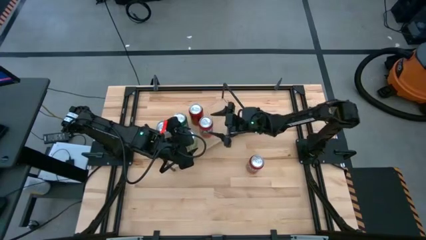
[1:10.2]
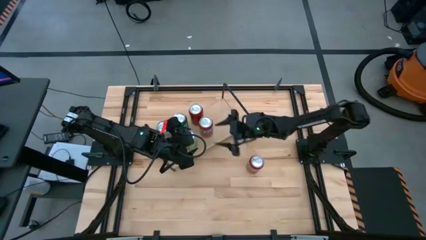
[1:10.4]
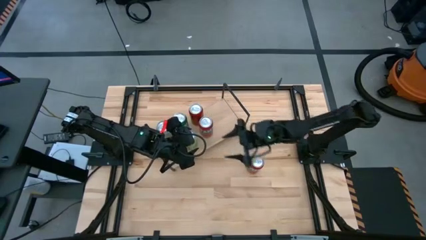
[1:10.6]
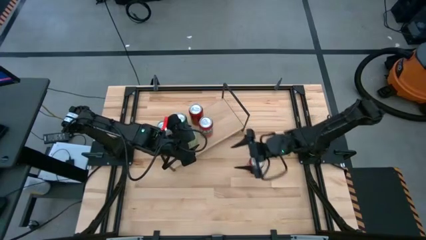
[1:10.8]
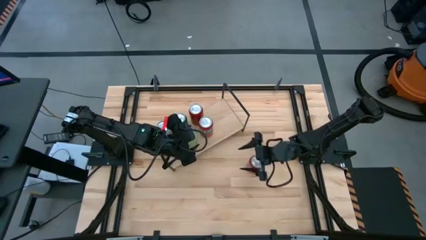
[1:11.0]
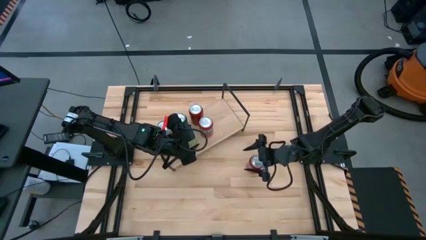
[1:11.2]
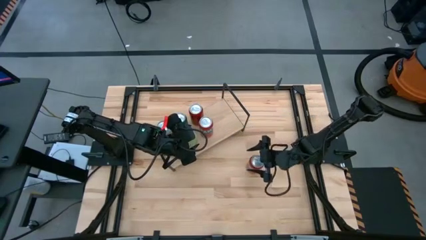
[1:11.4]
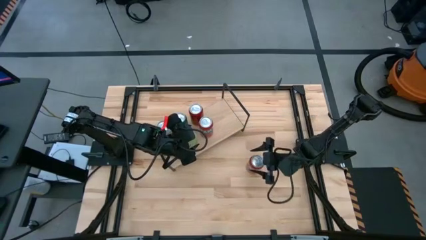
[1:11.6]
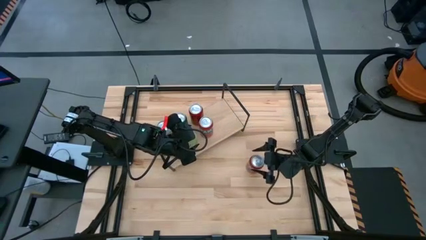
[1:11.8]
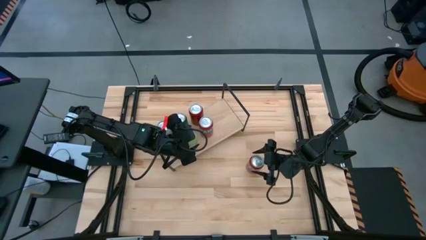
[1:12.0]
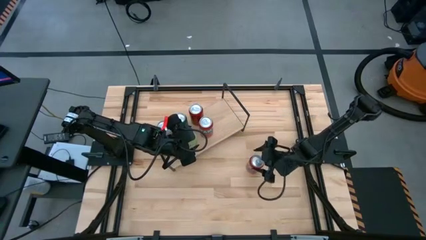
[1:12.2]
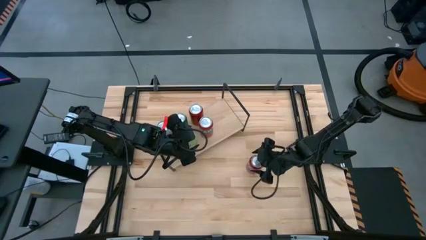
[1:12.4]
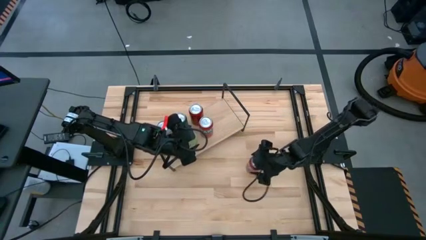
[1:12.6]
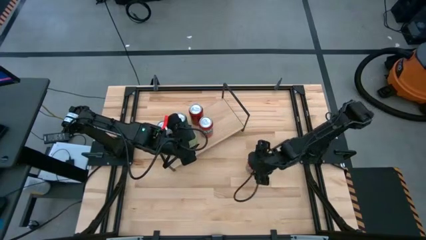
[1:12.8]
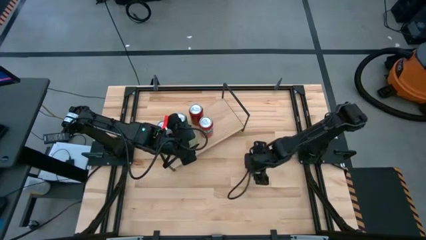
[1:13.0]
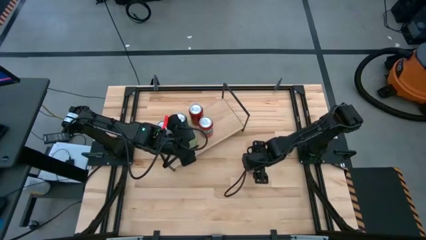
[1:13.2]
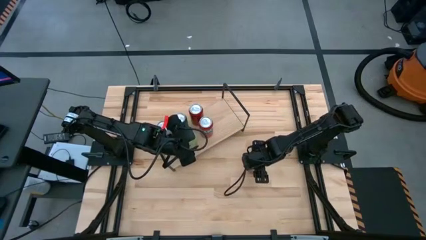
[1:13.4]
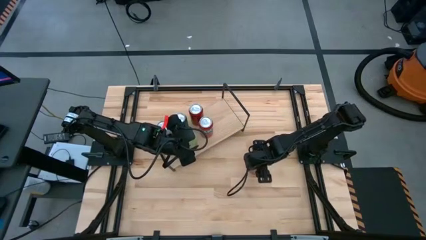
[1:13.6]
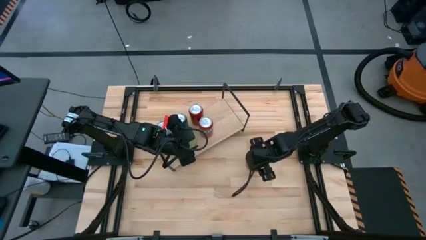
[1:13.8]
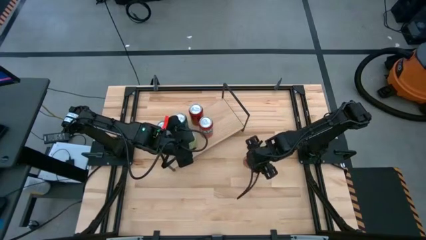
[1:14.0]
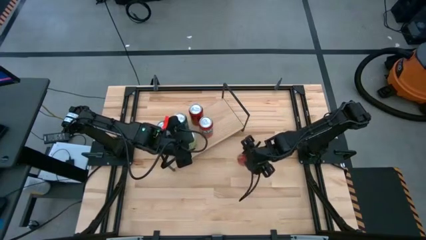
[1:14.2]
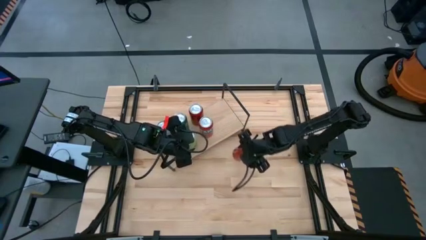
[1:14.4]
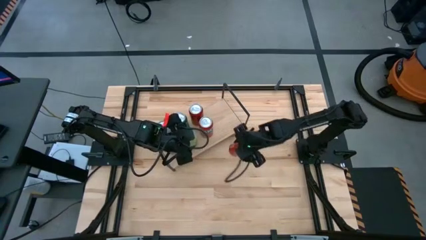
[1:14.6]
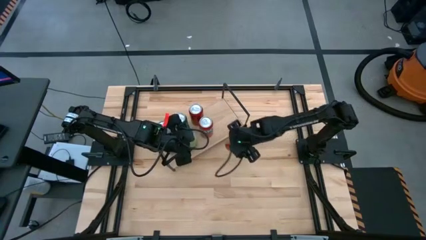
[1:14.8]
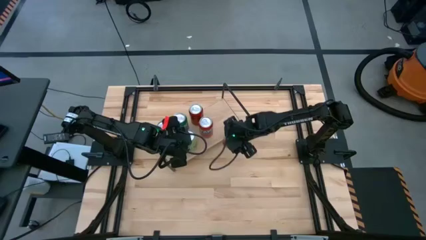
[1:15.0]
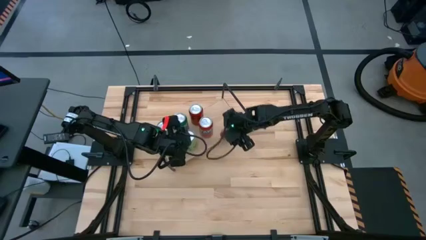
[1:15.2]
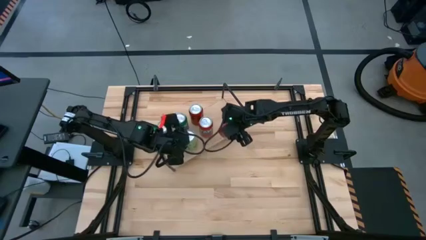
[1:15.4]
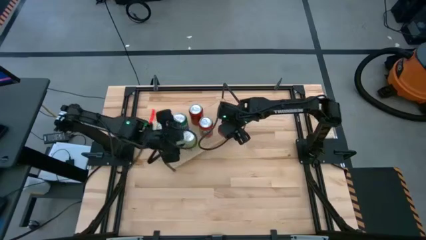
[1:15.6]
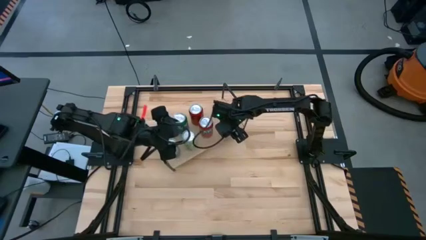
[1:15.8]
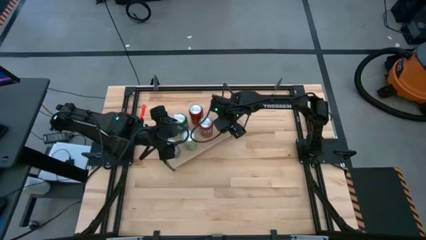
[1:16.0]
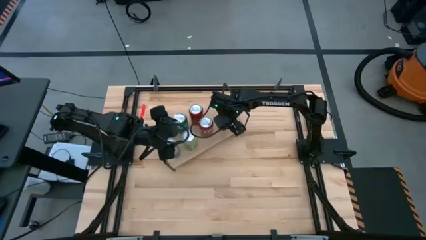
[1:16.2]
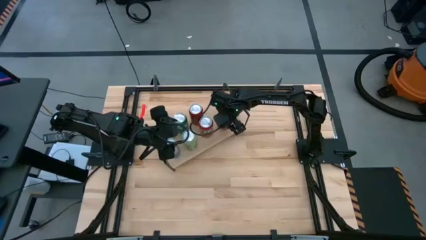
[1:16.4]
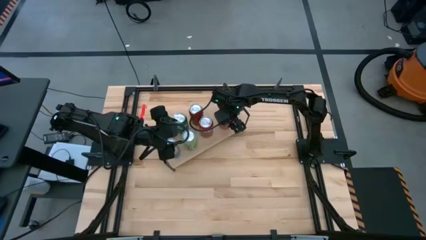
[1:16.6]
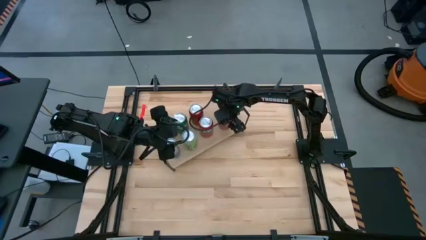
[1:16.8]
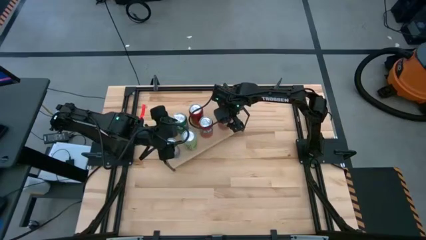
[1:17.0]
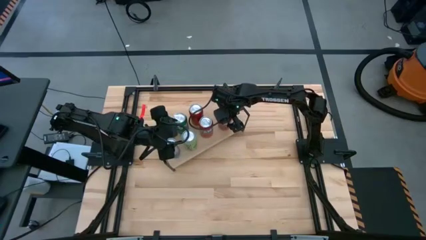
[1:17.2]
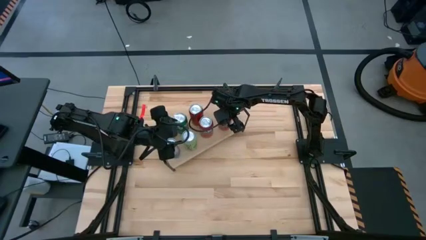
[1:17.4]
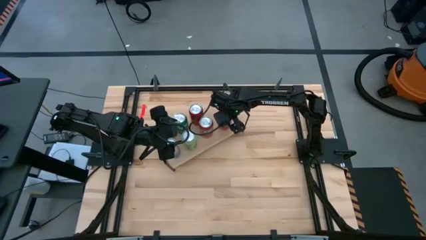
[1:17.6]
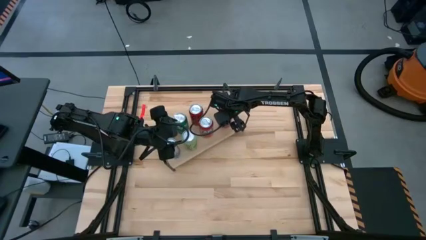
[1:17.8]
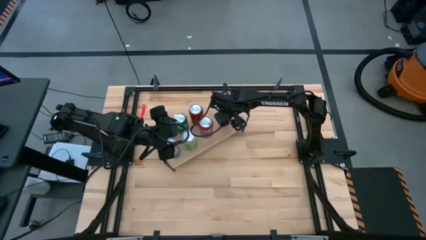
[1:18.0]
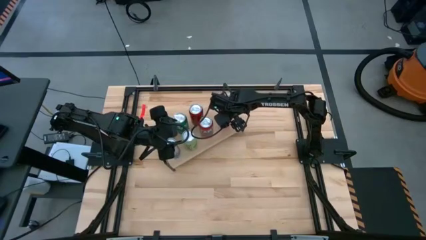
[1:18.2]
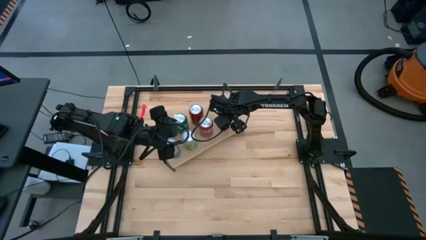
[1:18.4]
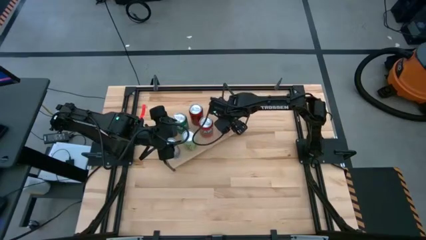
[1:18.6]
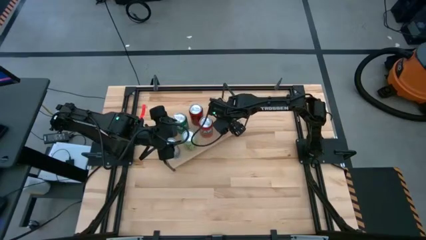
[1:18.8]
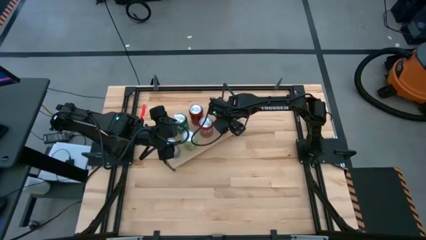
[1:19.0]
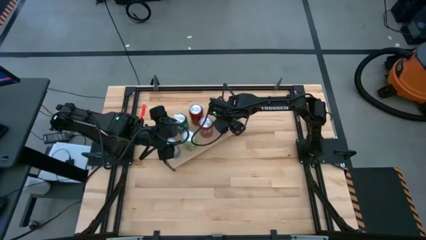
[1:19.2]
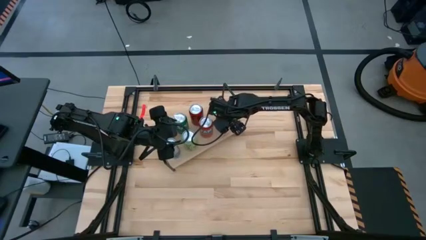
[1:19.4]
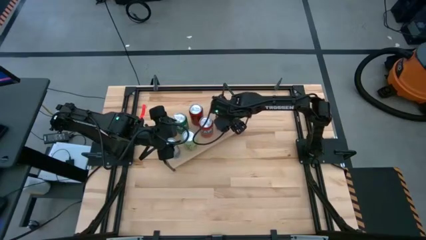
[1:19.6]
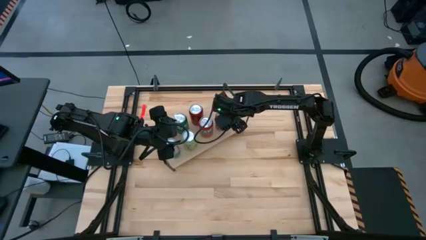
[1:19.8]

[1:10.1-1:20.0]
Task: Place canned beverage on shelf
Put the red soda can on the shelf

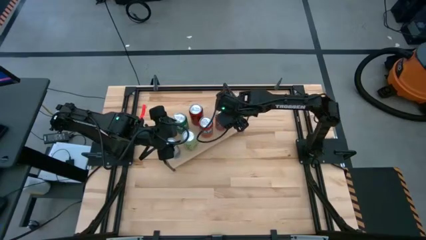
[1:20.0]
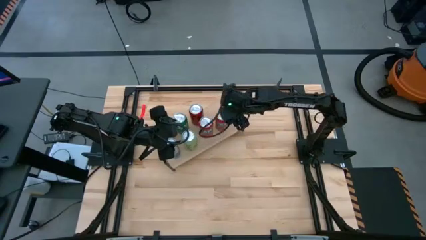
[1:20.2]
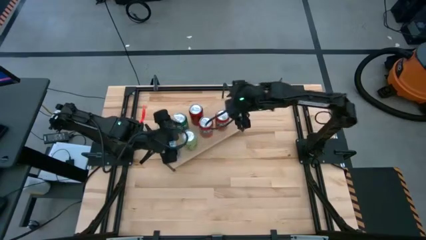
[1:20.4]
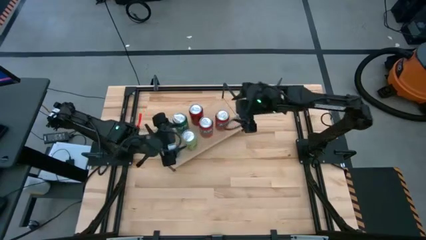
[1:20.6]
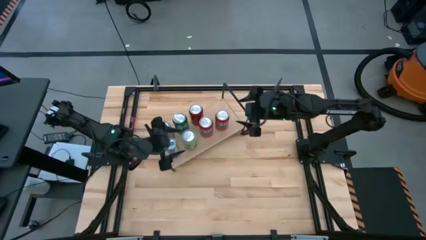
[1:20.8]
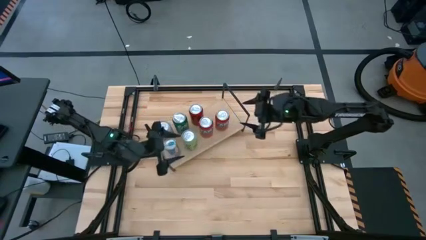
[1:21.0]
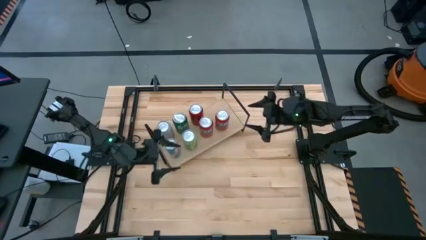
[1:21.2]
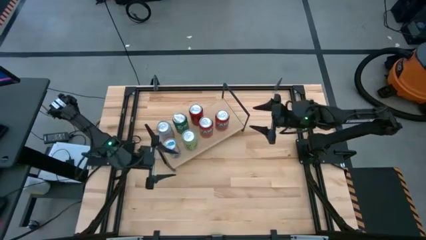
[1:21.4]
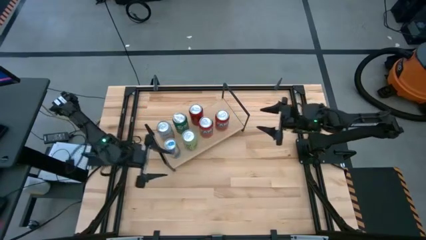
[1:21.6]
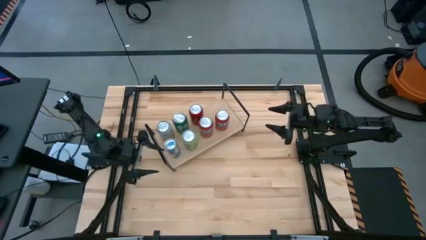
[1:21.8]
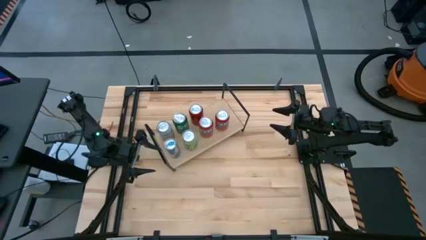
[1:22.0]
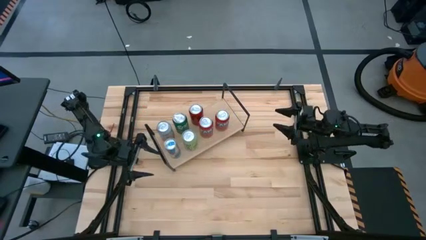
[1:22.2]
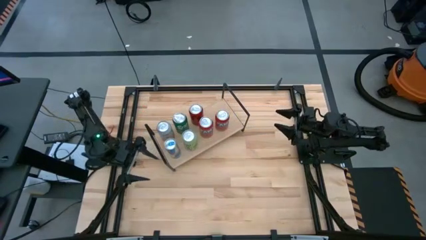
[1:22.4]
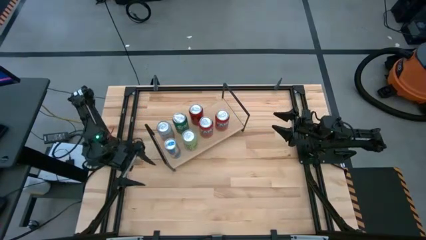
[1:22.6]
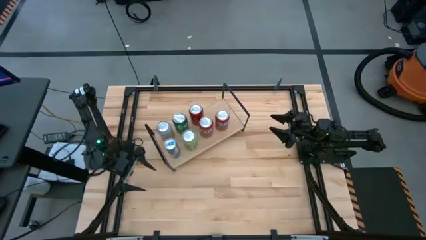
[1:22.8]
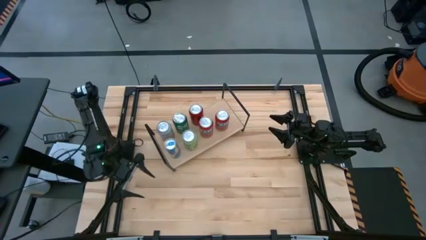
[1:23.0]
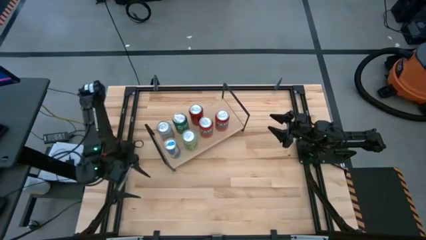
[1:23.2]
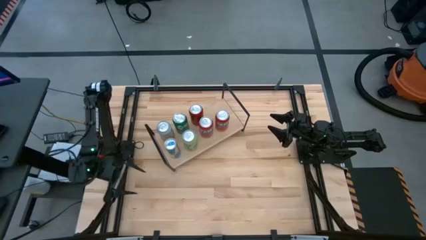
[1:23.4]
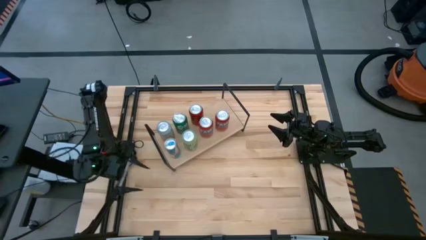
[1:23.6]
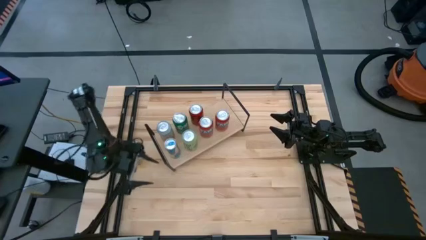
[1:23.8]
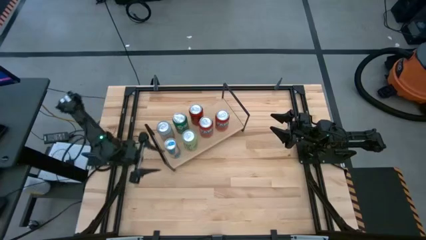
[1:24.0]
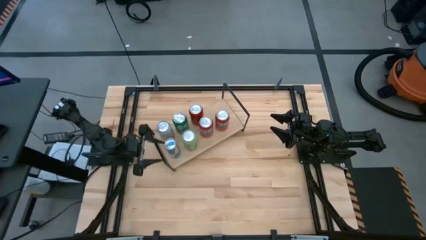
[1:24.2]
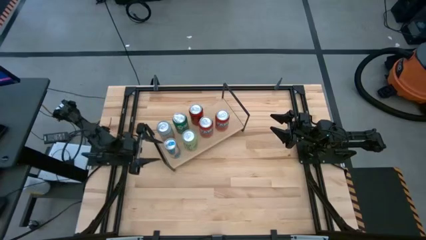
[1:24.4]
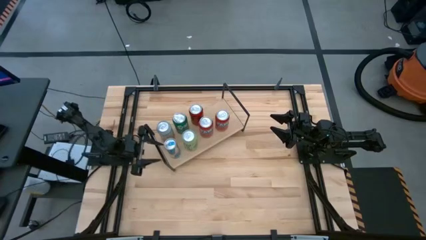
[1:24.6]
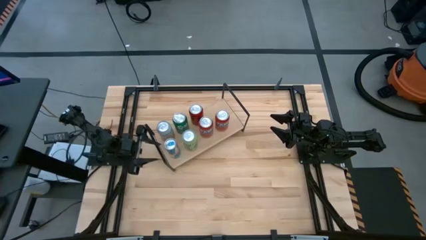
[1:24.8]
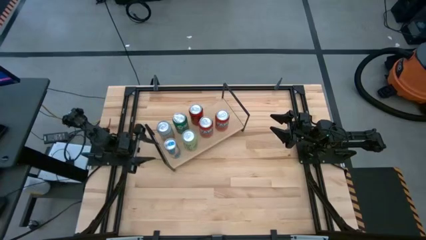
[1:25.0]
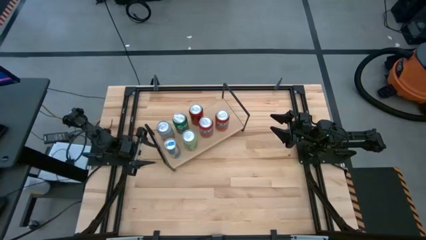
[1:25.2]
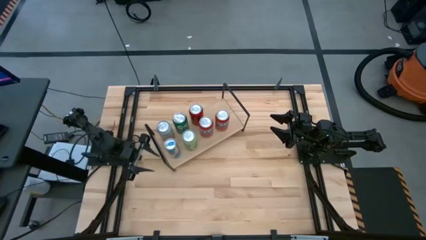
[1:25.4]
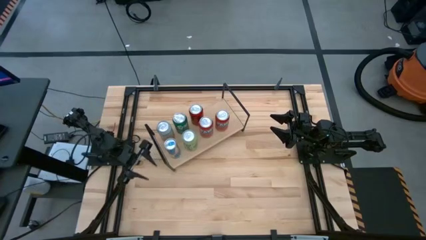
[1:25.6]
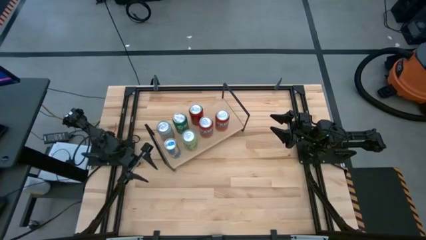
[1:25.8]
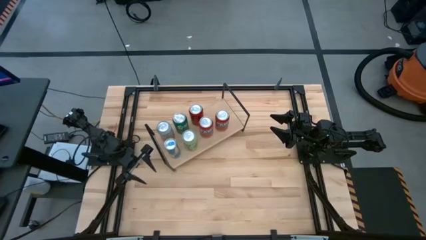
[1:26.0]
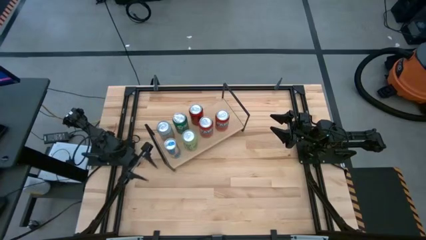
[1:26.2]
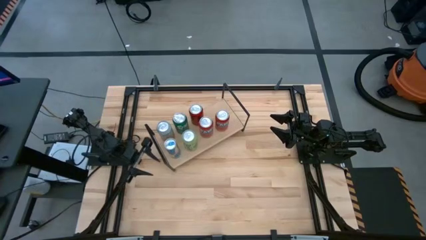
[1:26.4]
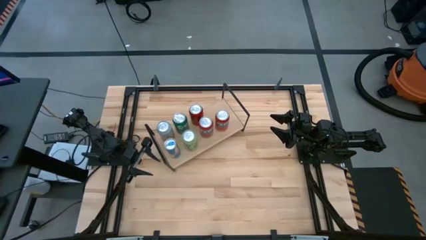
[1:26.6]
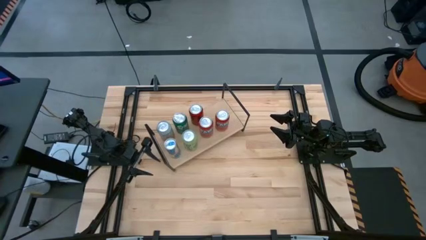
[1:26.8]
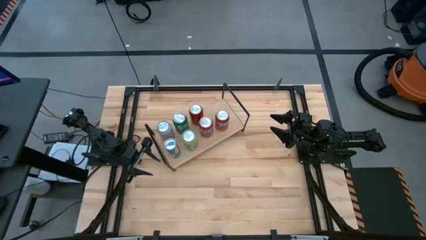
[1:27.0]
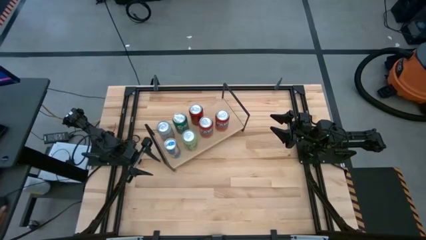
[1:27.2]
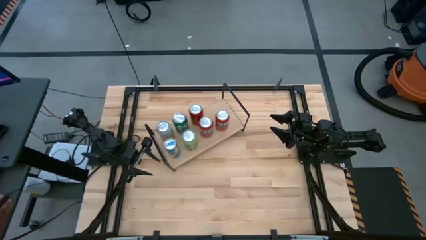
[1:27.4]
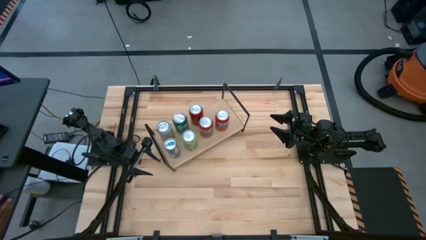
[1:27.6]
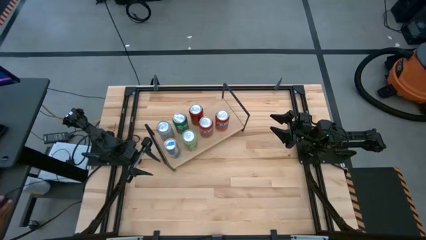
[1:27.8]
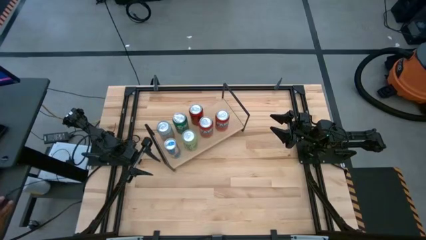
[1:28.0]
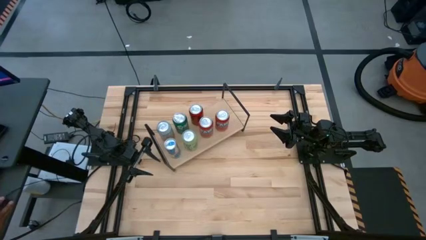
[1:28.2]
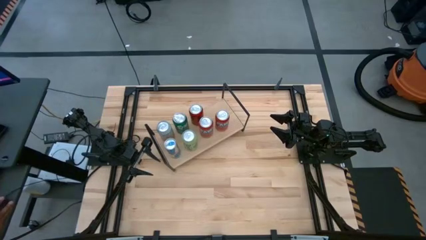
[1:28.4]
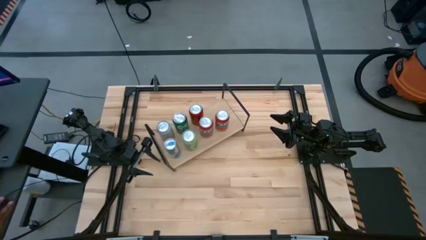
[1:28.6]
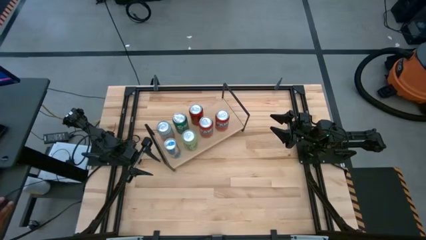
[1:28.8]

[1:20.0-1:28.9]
Return to Home Position
